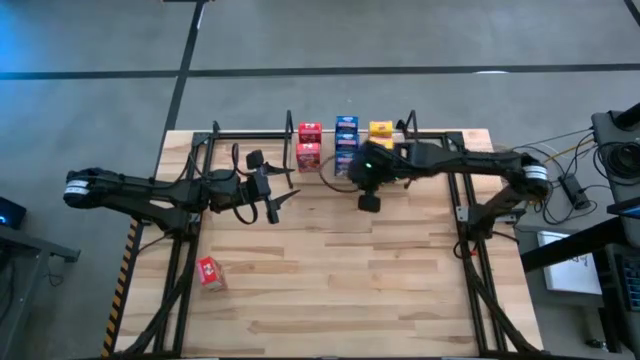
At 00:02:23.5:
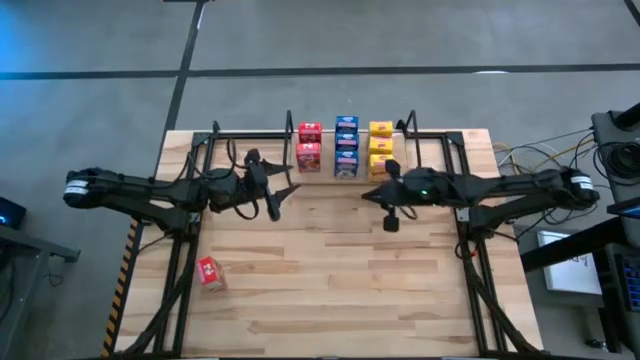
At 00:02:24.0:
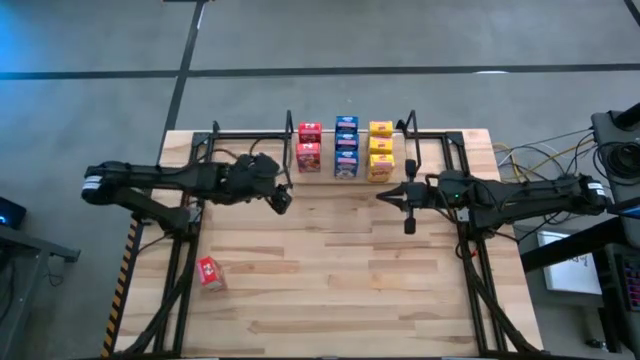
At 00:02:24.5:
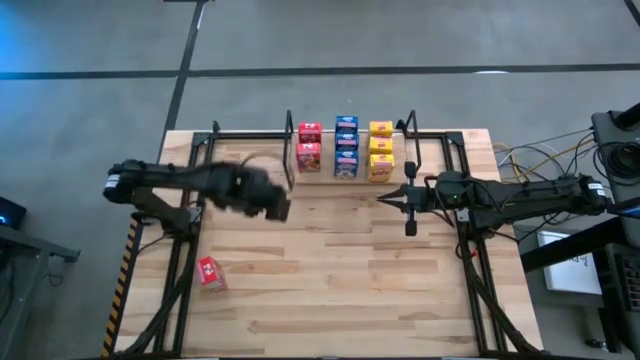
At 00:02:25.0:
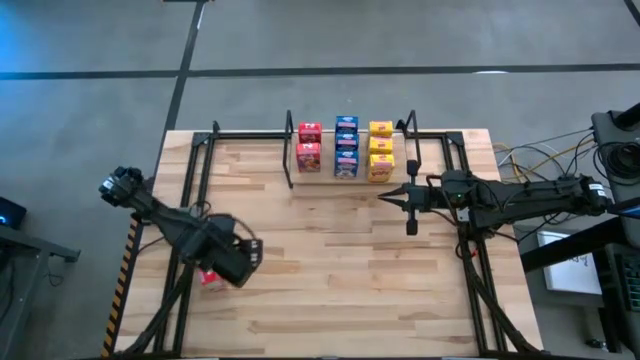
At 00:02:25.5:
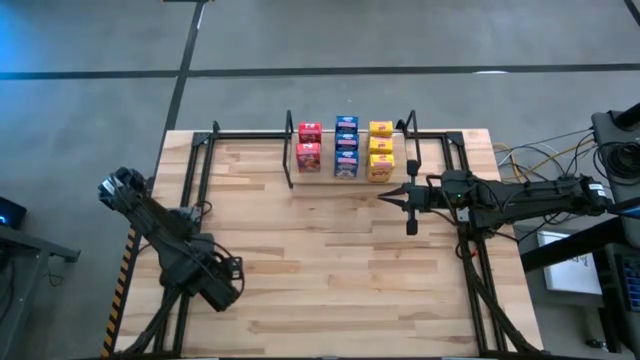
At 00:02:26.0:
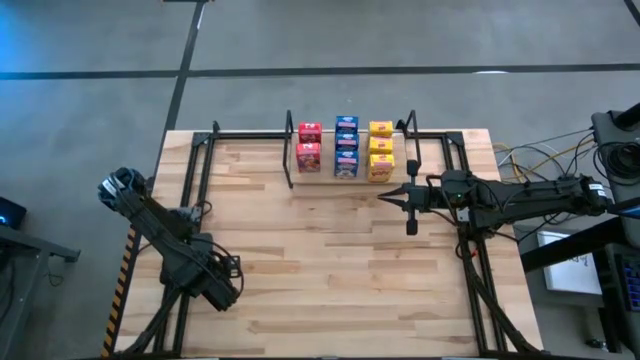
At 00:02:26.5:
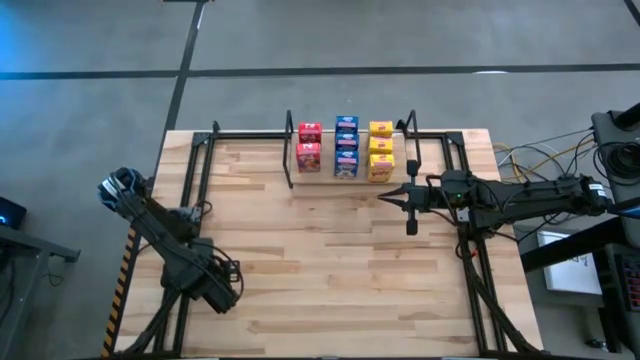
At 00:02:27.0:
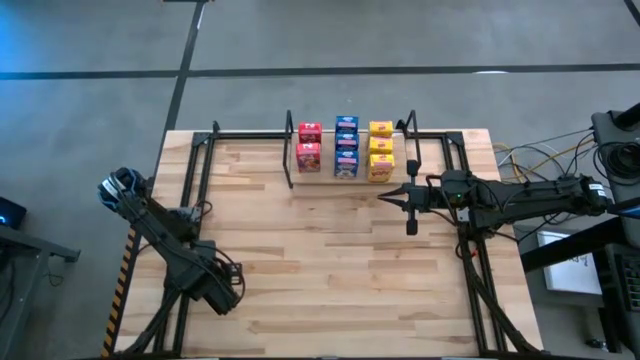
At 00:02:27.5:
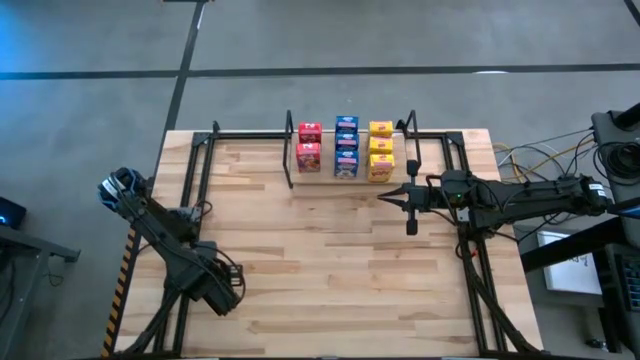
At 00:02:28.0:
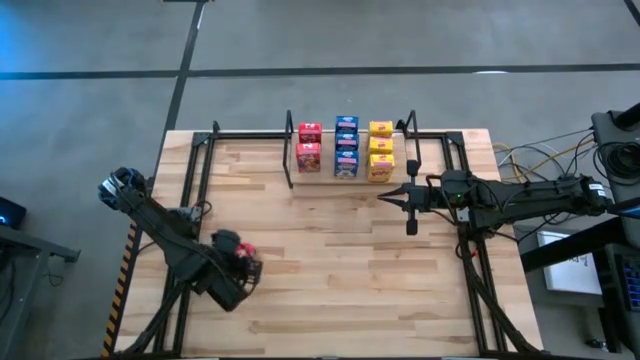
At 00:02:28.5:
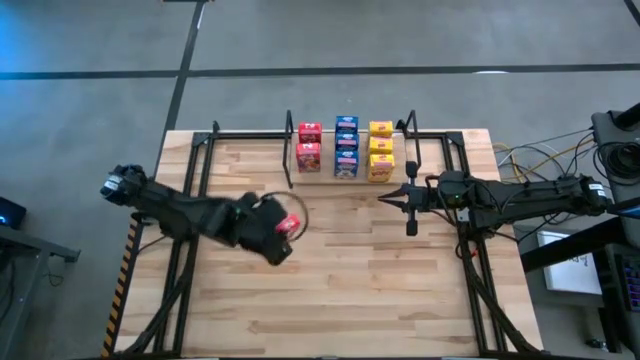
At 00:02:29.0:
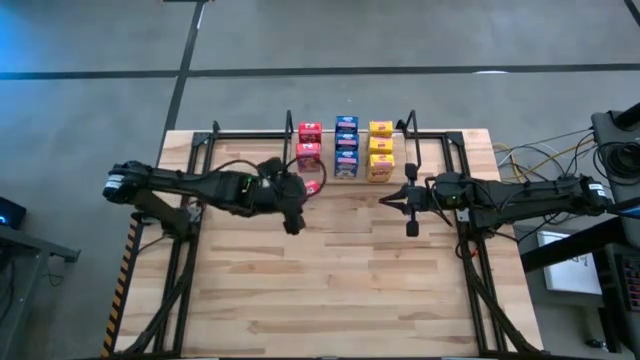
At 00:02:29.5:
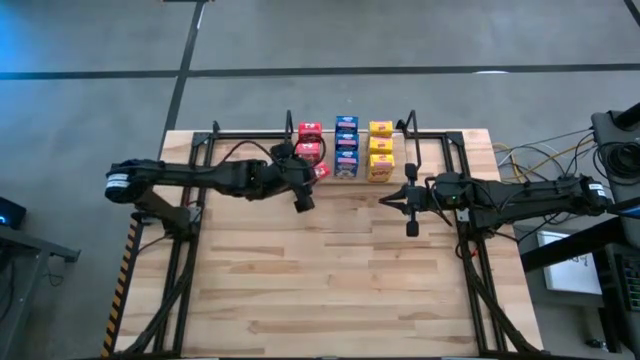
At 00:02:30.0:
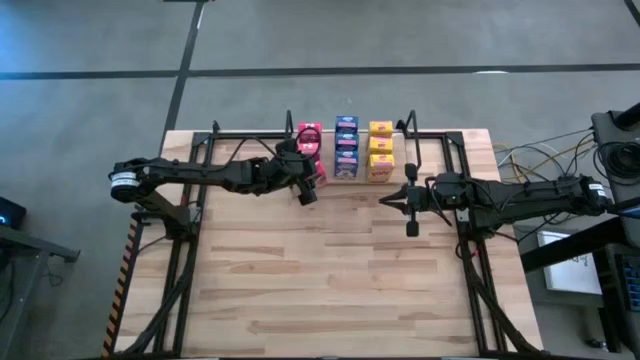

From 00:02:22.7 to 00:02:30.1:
Task: Stack cereal on shelf
Put the red cereal box on the shelf aligned with the other red cereal boxes

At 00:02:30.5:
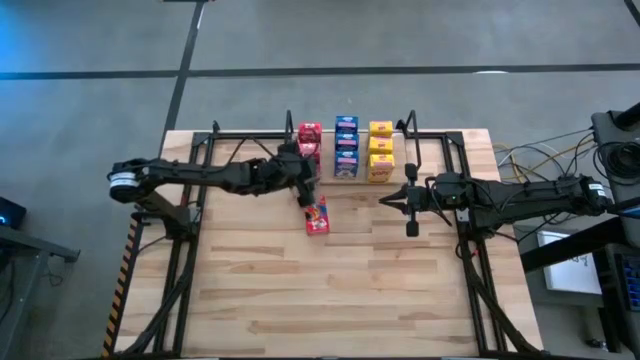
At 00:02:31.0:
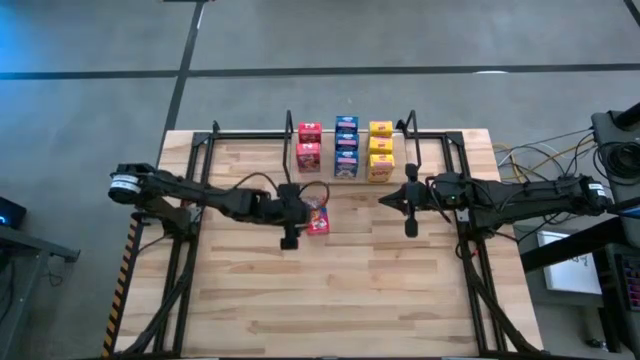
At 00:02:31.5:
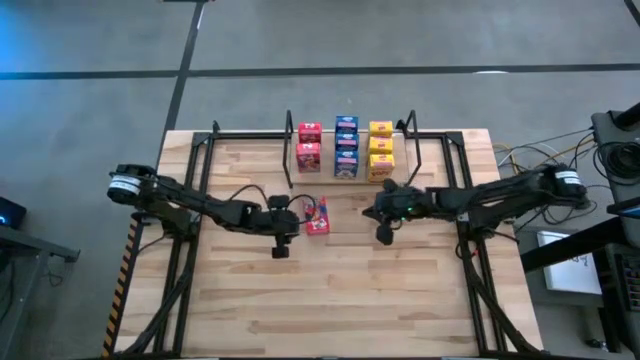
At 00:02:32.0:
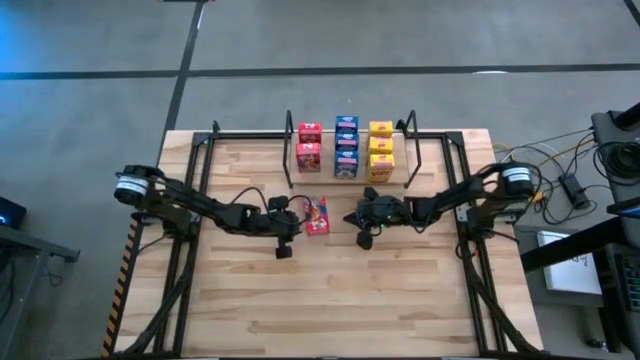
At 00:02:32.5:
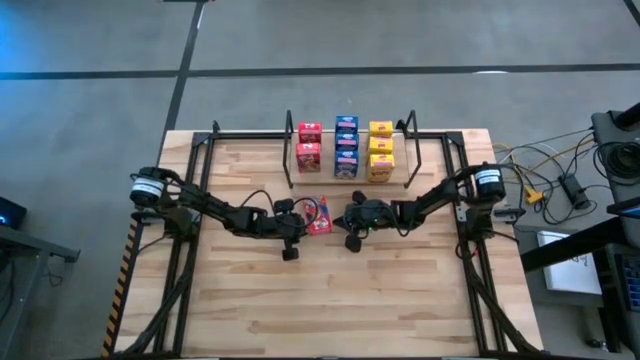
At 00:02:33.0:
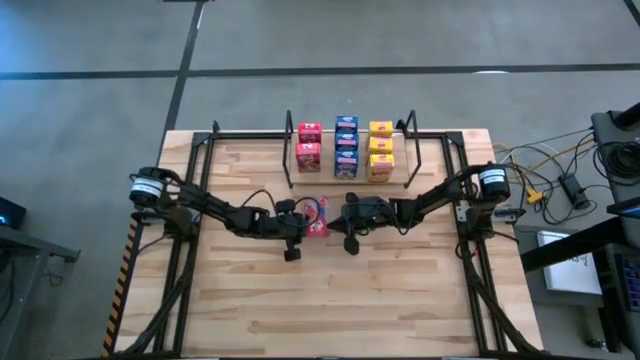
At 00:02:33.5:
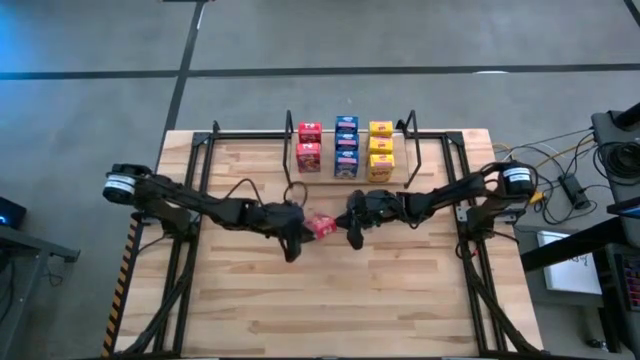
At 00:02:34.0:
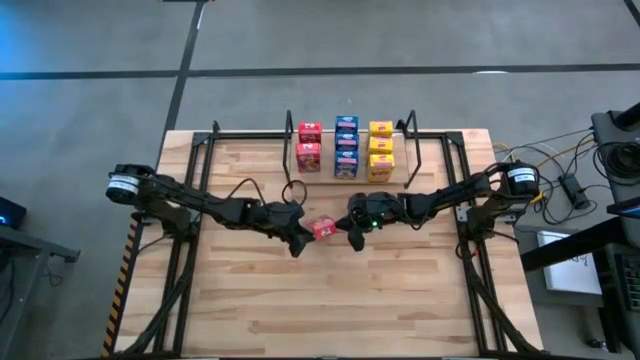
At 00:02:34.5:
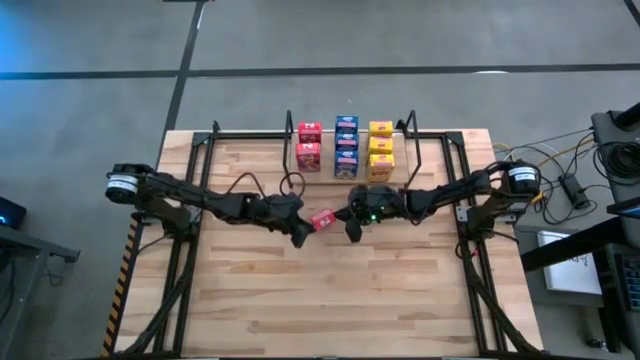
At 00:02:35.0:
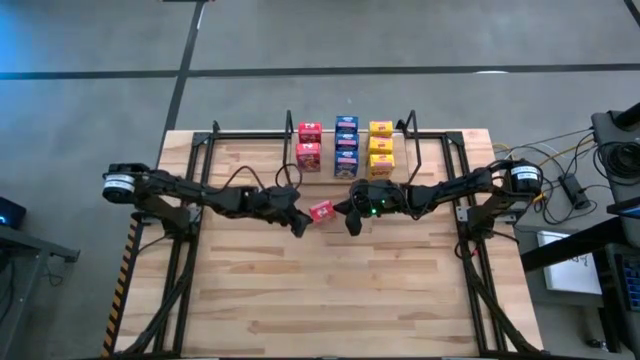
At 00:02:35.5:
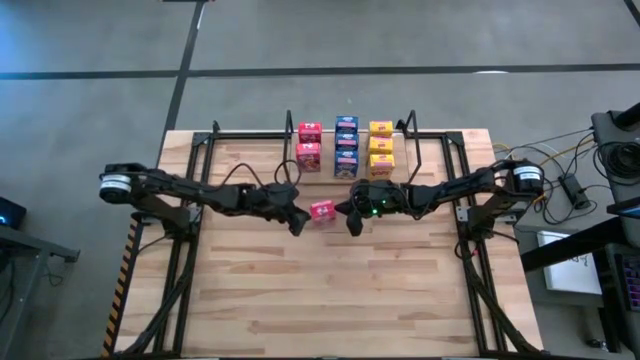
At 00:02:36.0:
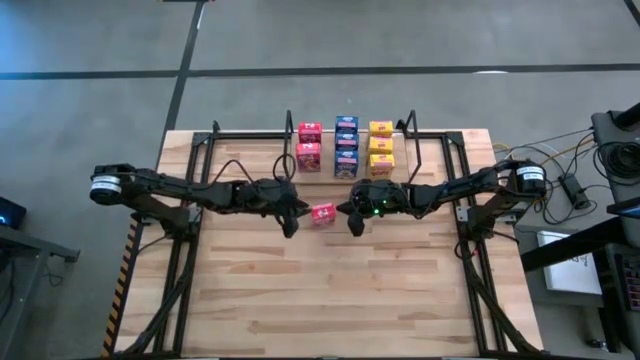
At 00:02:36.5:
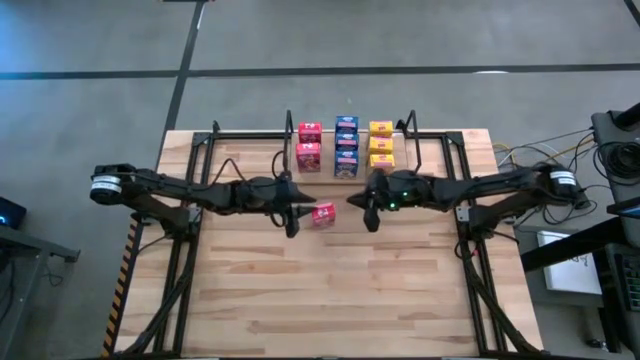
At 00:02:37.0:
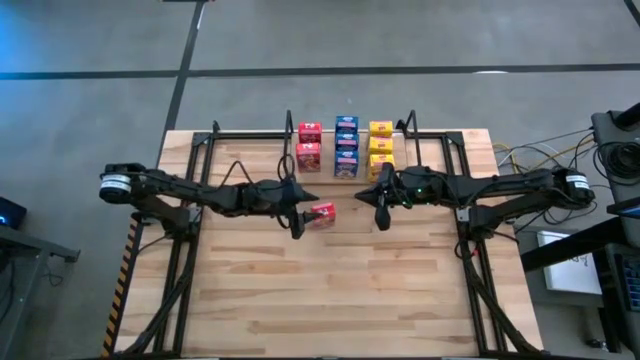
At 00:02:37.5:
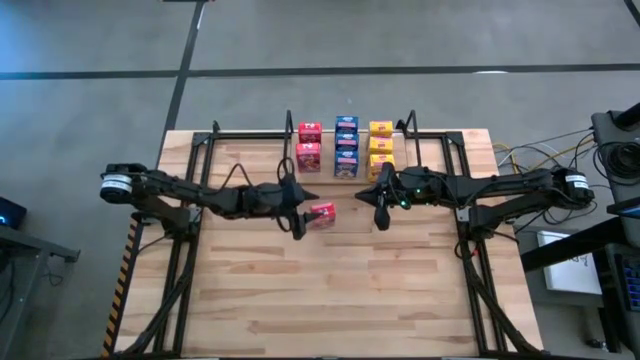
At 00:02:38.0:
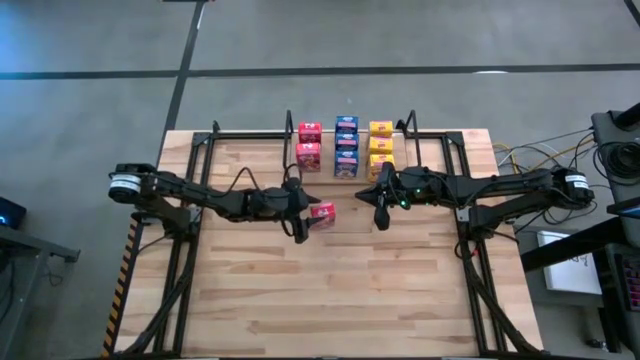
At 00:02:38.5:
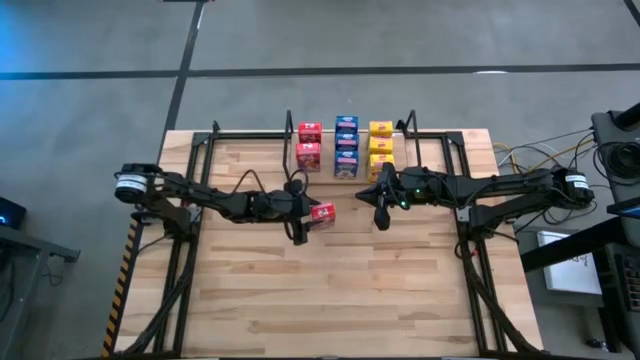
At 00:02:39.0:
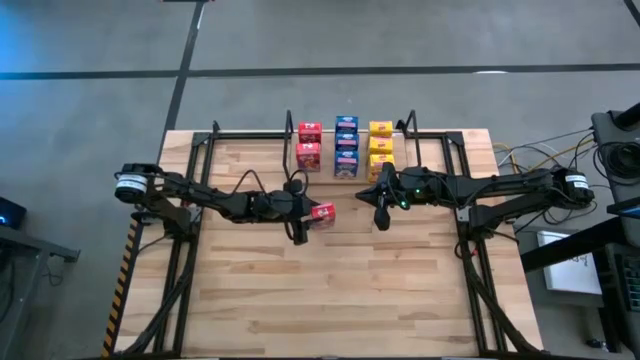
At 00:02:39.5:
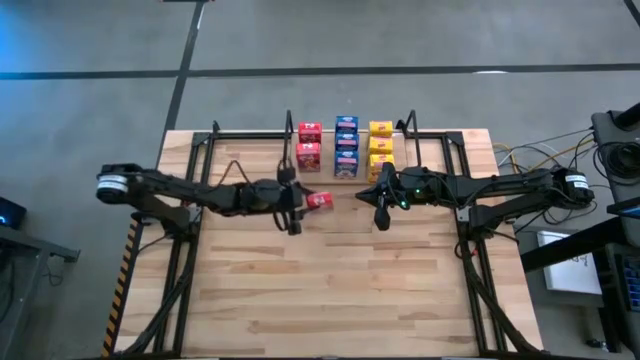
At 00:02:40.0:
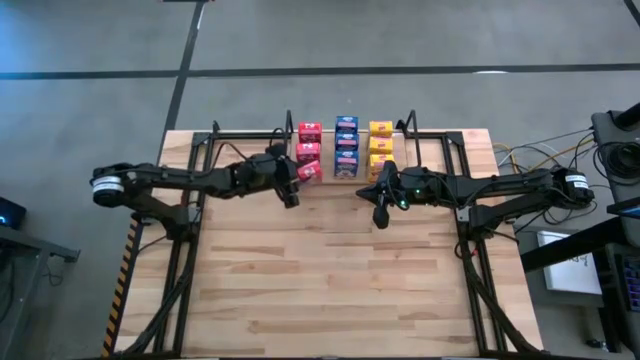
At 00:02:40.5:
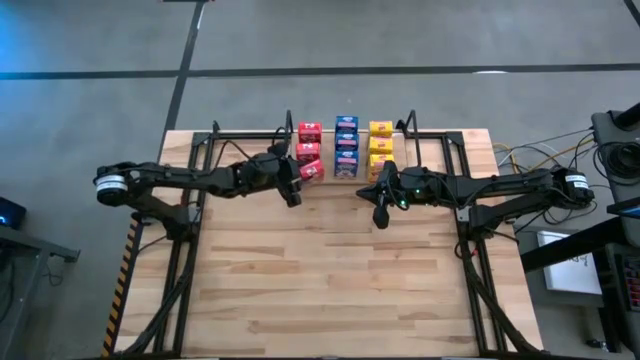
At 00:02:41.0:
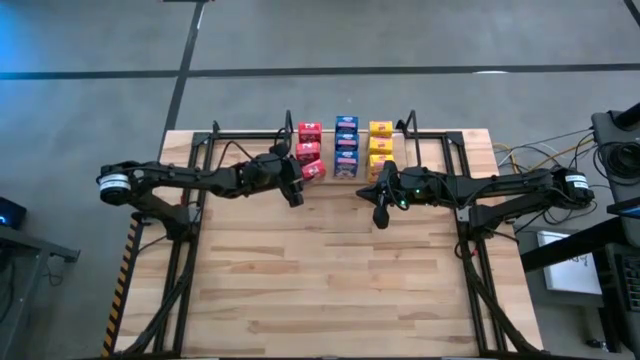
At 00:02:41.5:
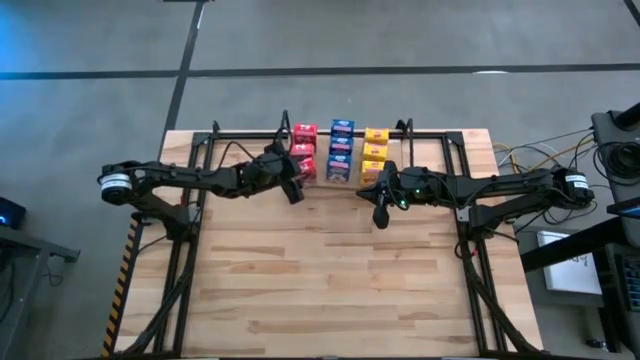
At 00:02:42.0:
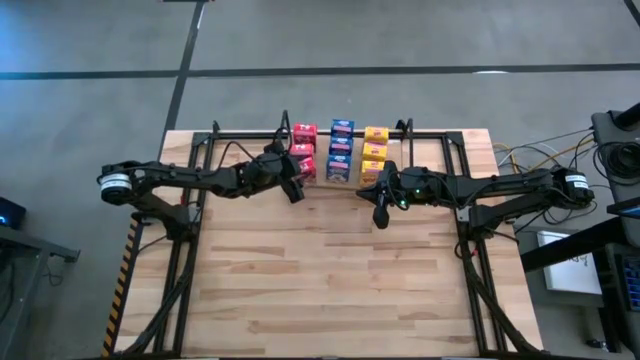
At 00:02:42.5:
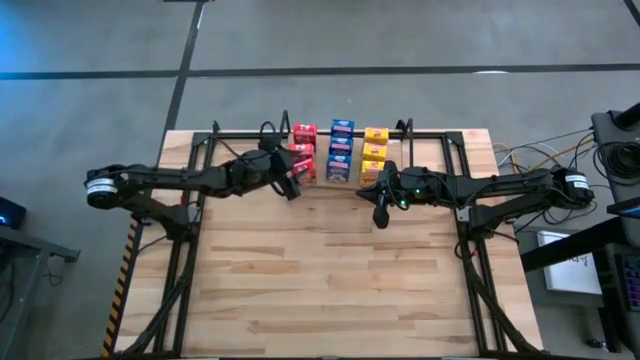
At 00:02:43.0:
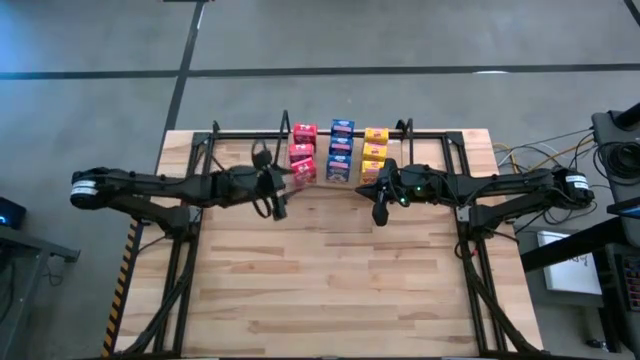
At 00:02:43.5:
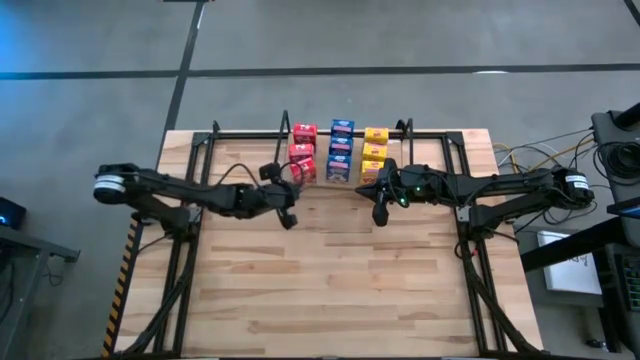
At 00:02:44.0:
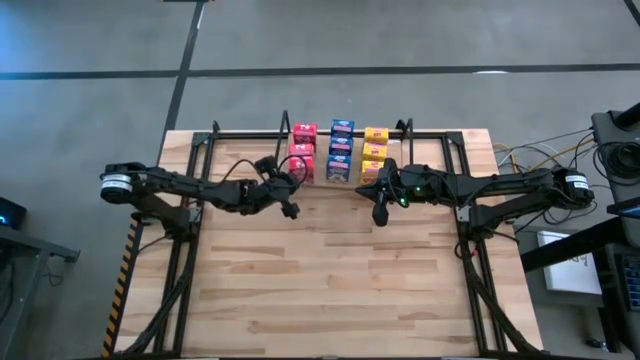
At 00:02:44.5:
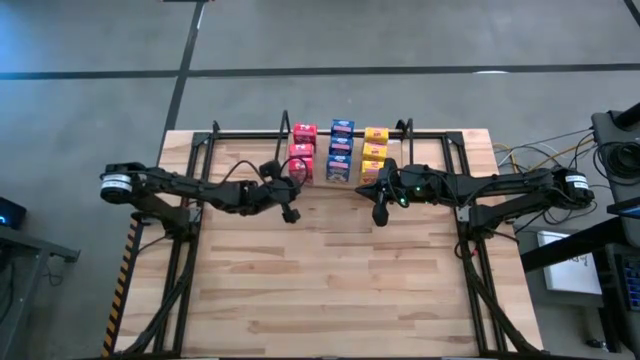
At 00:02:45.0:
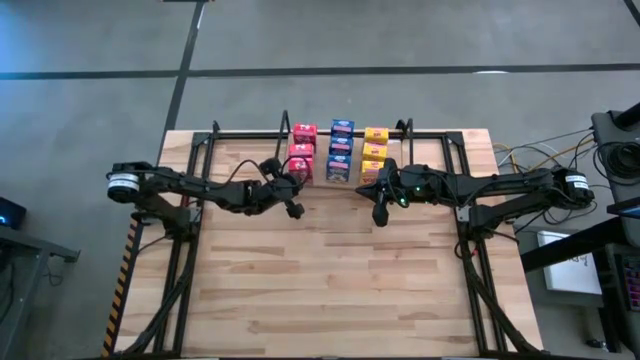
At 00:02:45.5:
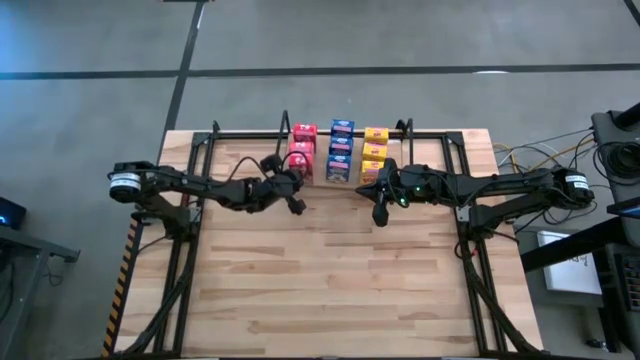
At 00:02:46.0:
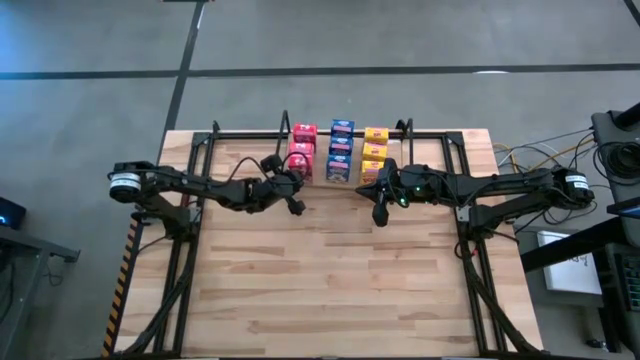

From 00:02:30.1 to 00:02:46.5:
Put the red cereal box on the shelf aligned with the other red cereal boxes
